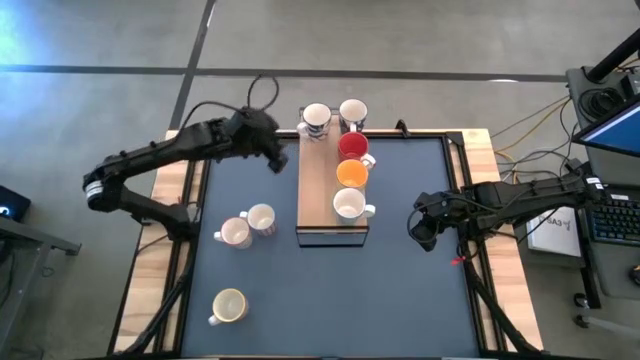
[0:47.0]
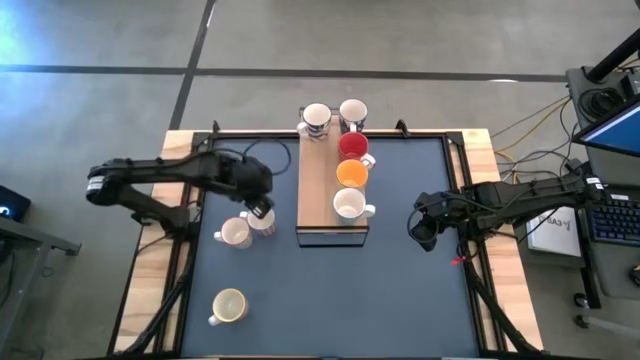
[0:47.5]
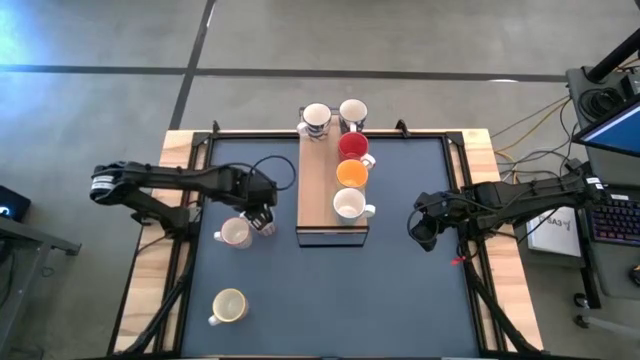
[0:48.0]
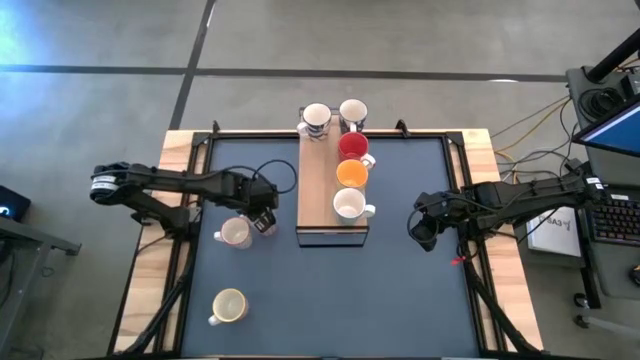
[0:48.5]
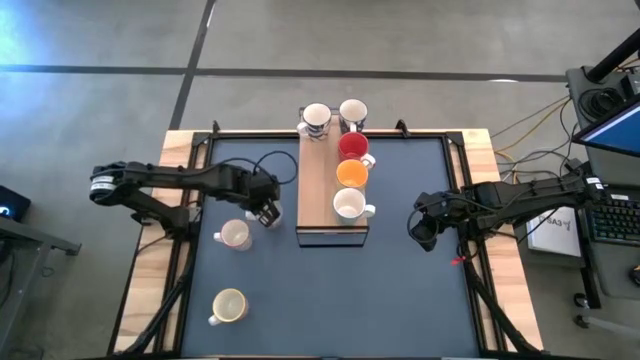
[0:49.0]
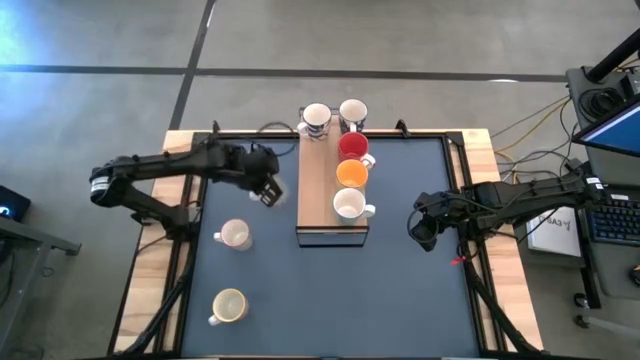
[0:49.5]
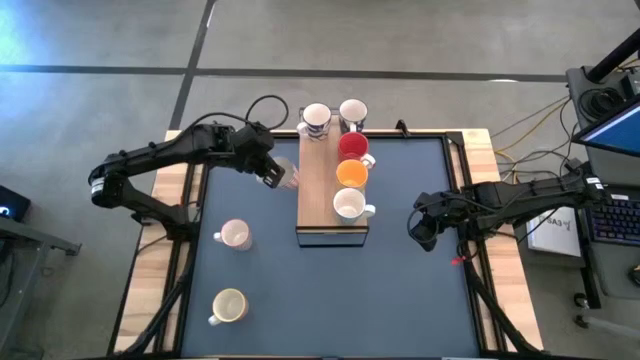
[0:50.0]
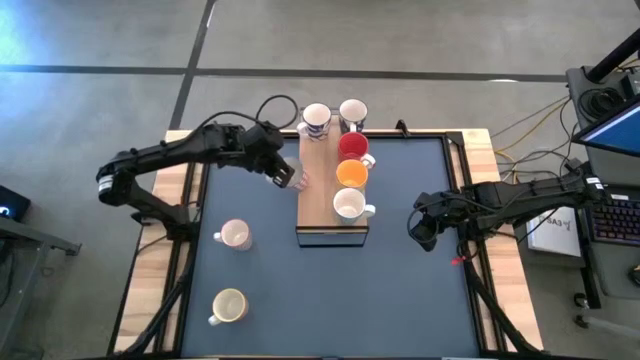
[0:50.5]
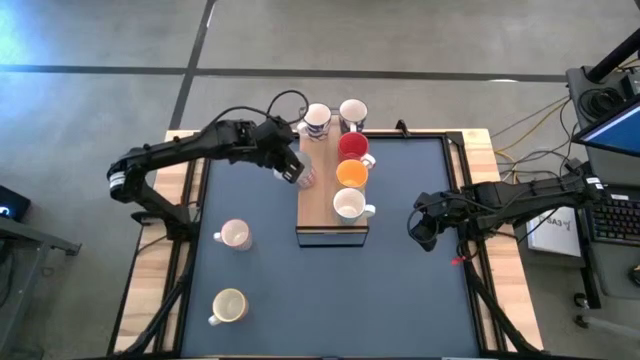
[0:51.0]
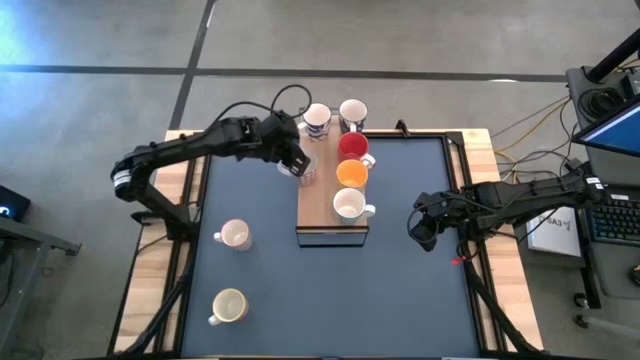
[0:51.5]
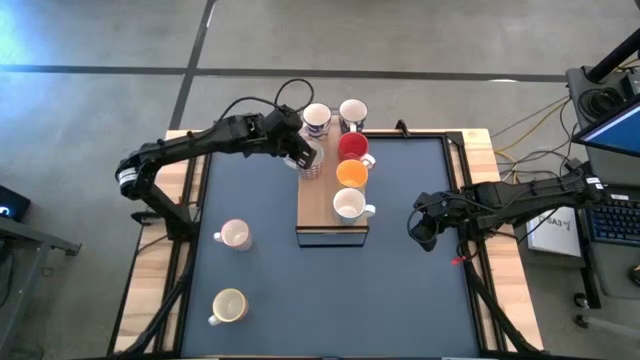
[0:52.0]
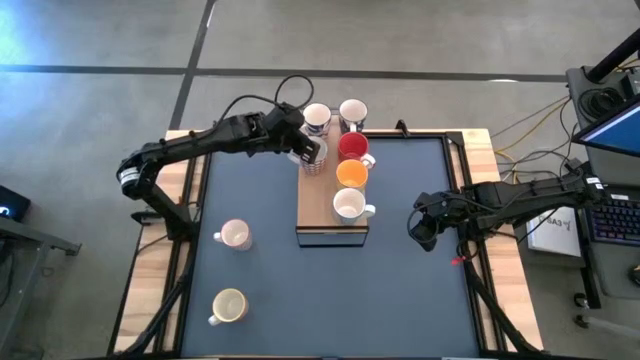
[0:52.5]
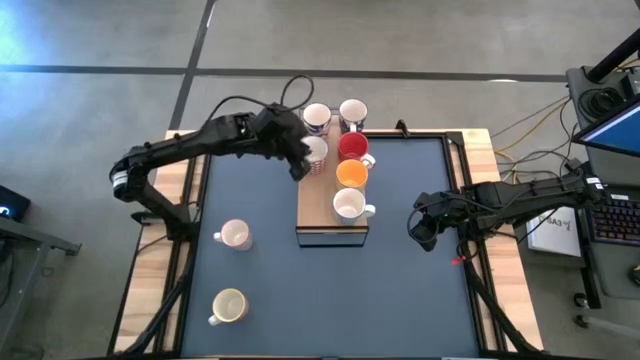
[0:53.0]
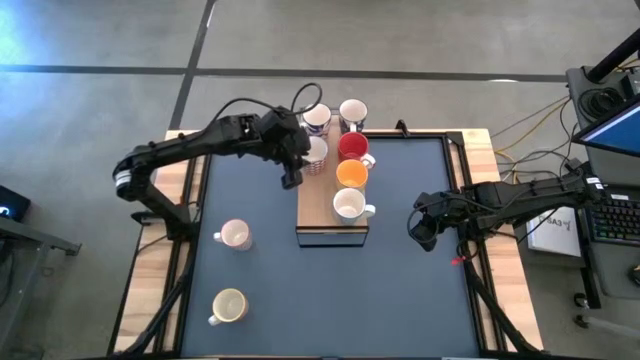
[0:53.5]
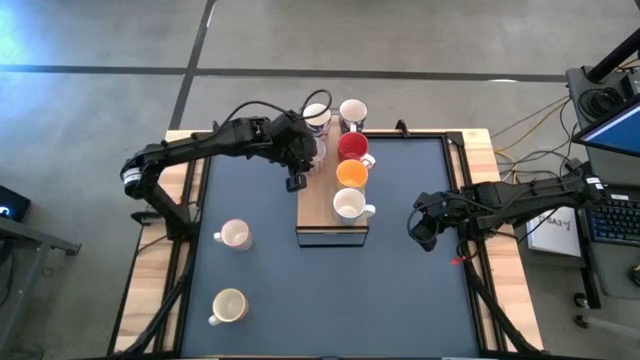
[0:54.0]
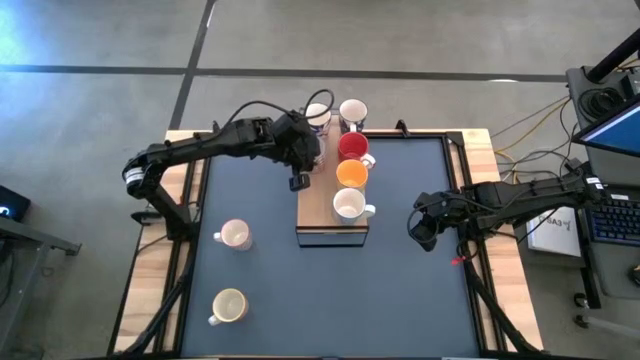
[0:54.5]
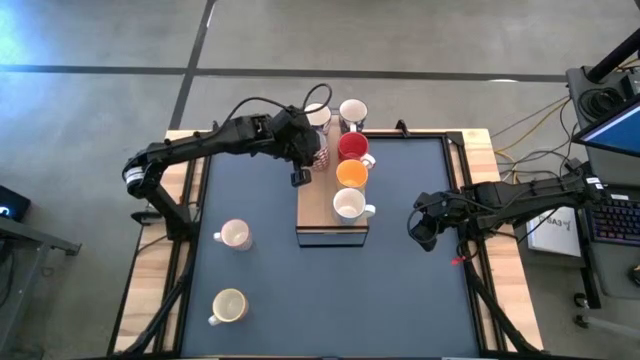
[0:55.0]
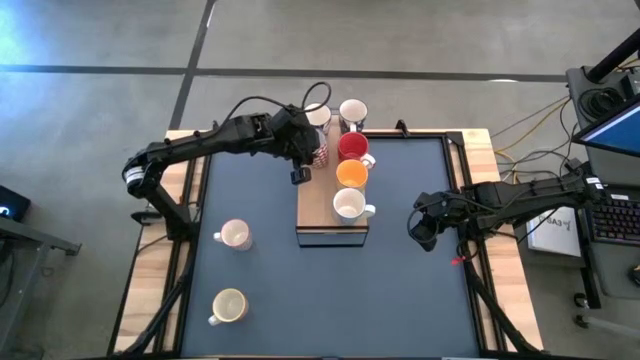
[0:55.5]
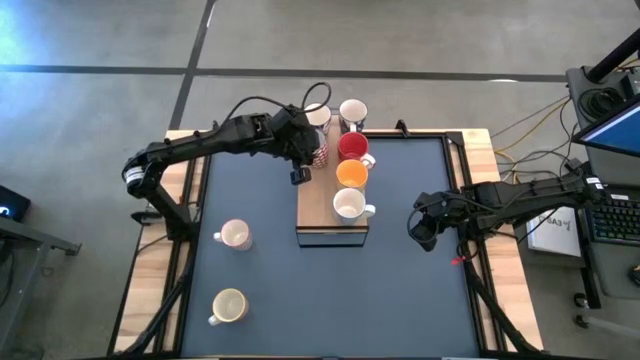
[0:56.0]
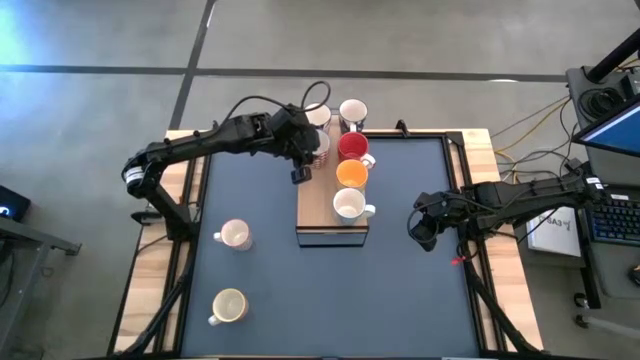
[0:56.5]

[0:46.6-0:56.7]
Task: Place coffee mugs
Put the red patterned mug on the shelf

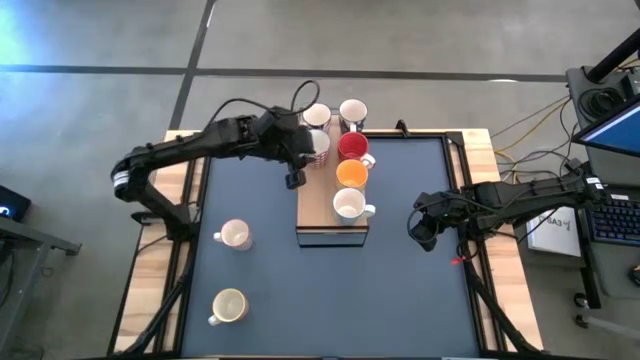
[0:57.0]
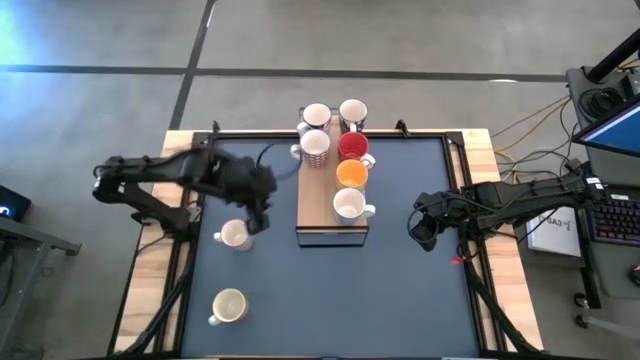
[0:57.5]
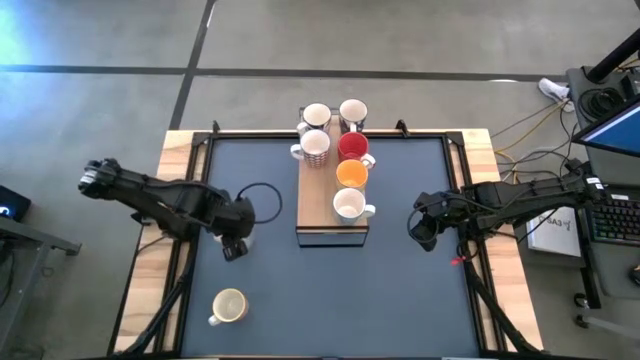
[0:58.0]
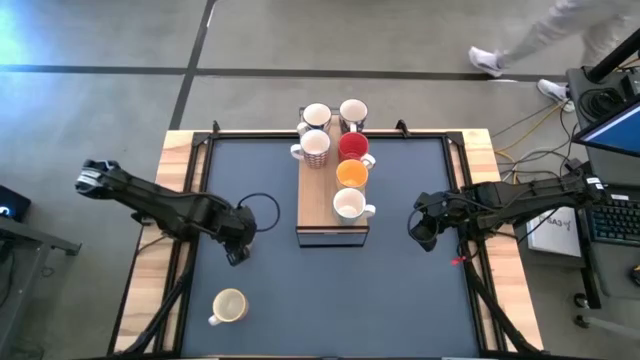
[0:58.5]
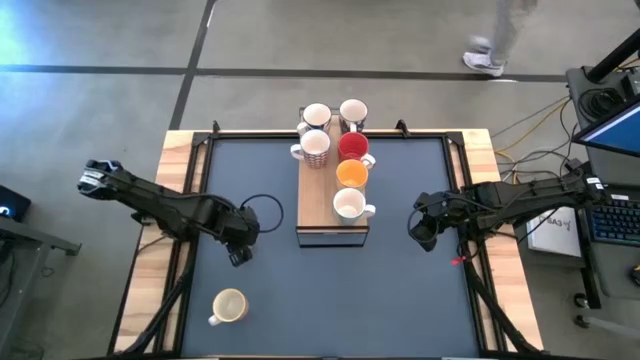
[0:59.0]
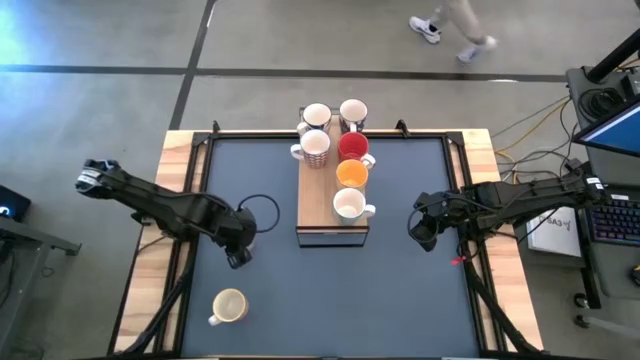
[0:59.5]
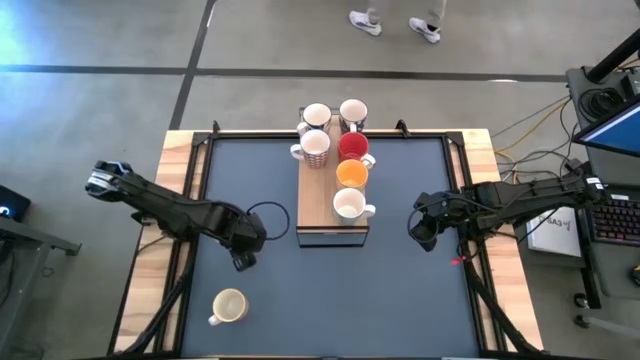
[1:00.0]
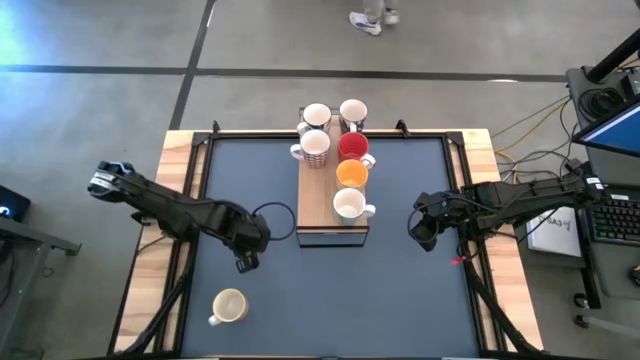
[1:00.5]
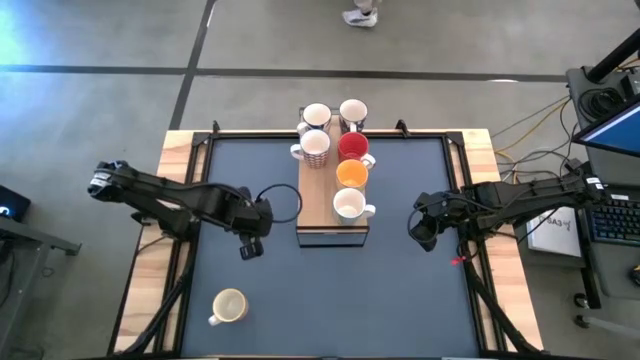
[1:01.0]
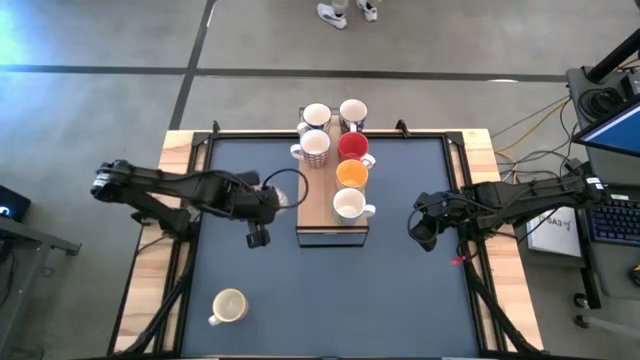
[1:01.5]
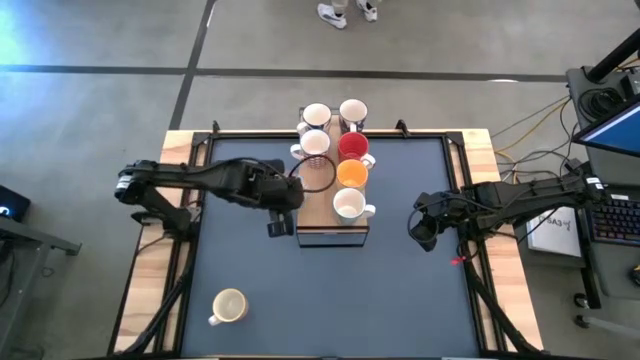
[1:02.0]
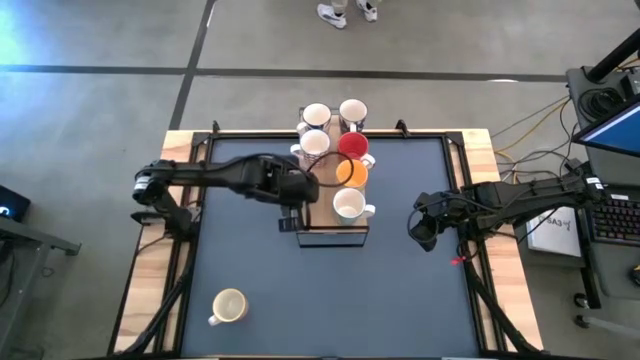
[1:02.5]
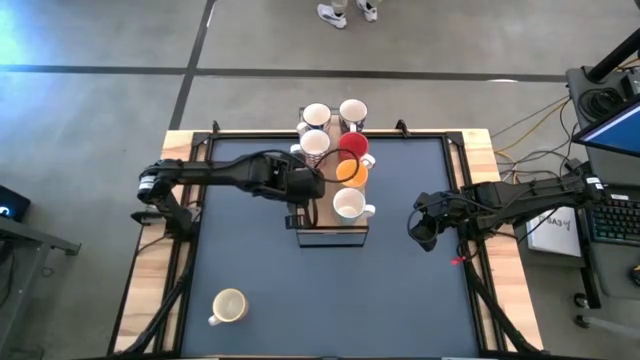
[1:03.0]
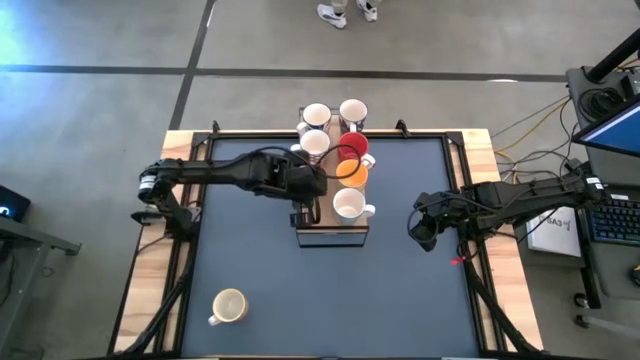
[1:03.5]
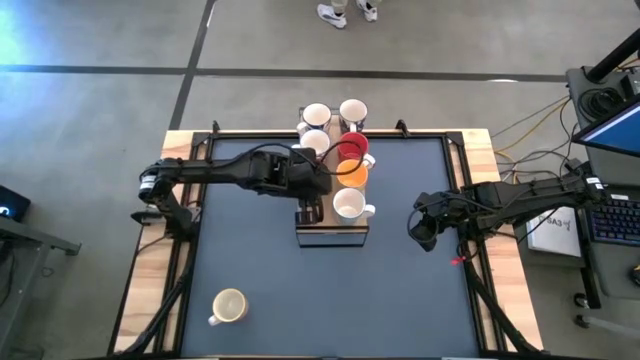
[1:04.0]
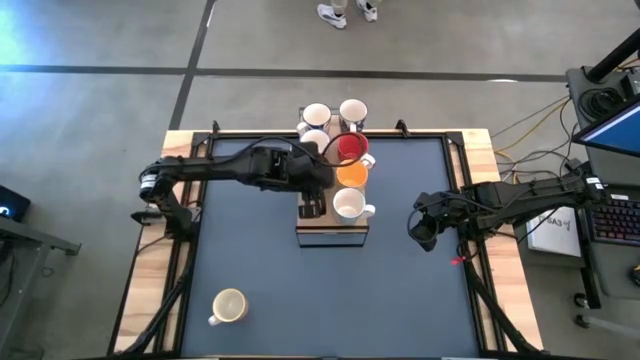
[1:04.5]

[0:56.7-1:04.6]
Put the gray patterned mug on the shelf

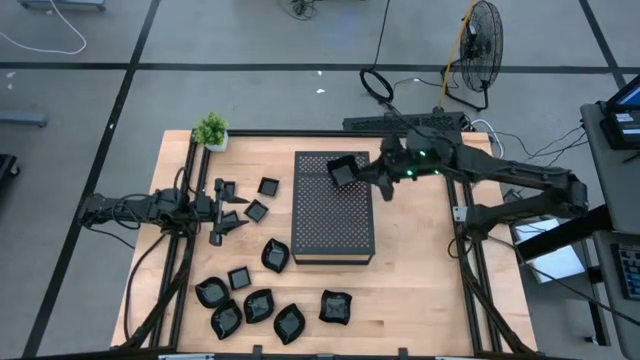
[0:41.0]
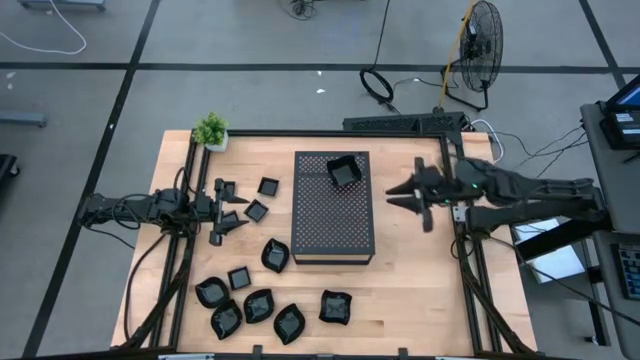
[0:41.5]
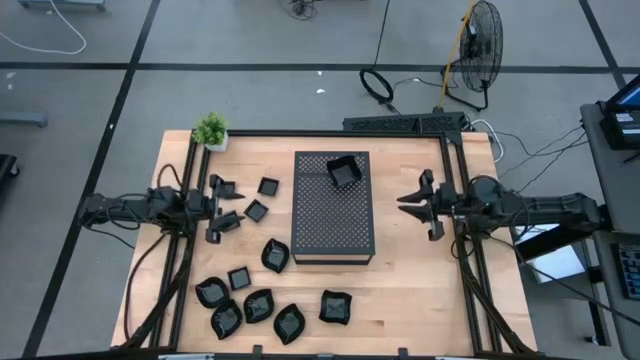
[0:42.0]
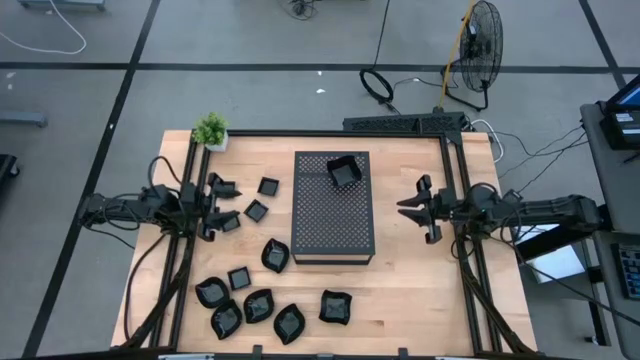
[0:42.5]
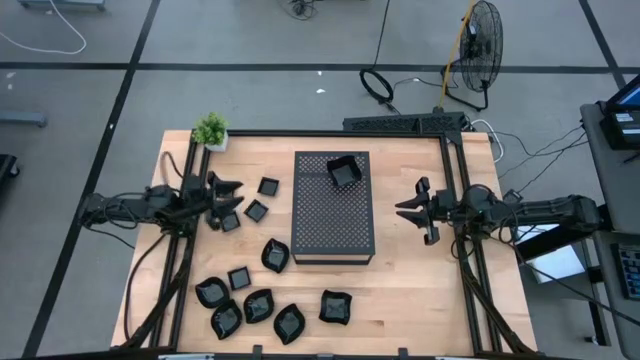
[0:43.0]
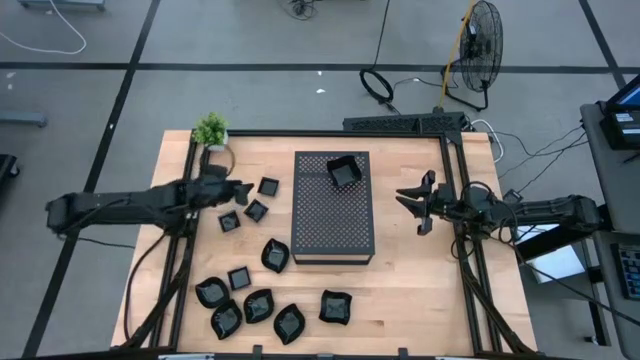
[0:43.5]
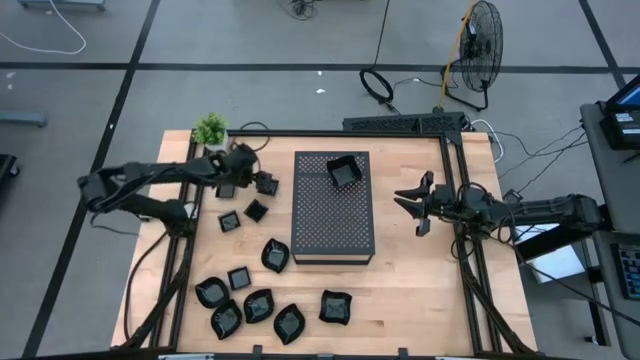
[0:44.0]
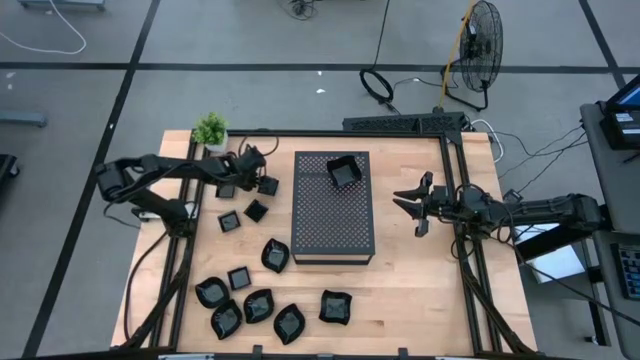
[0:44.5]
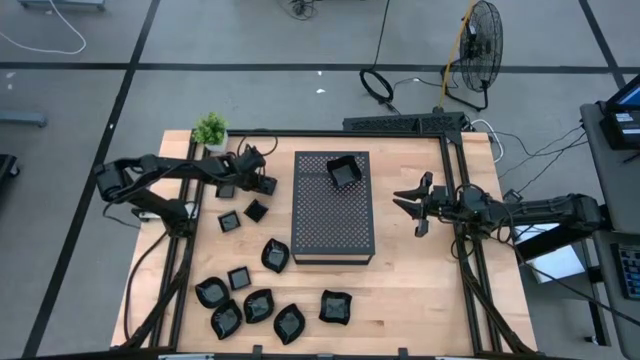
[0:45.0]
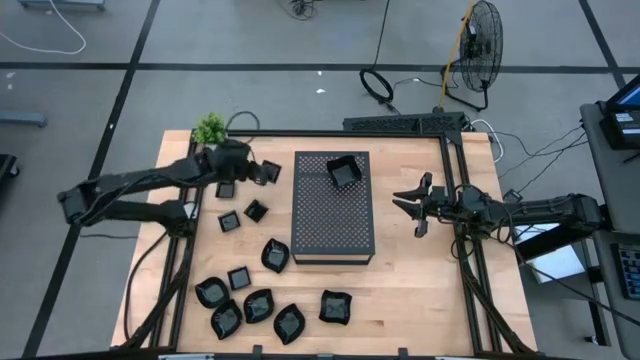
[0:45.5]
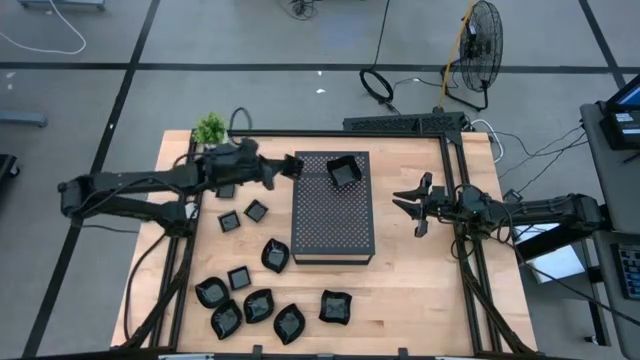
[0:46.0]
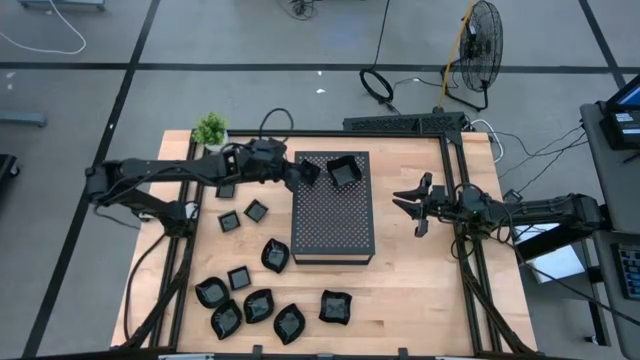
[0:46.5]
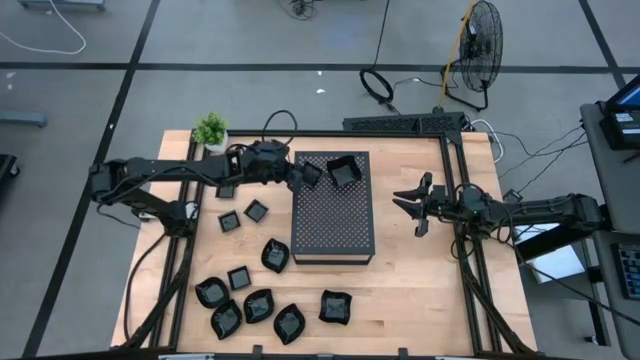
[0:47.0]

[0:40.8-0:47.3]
Task: Pick & Place Mini shaped plates
Put the black square plate on the shelf
